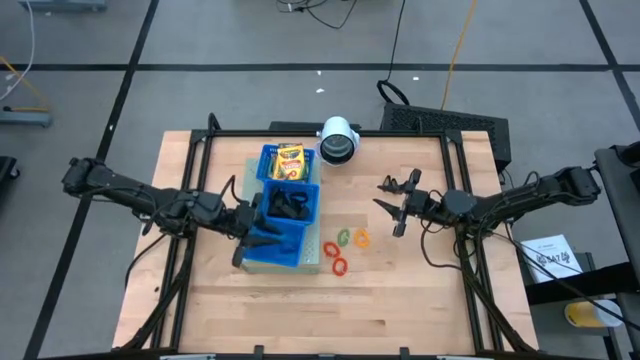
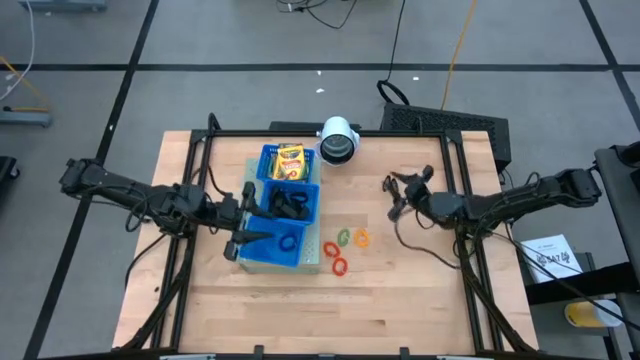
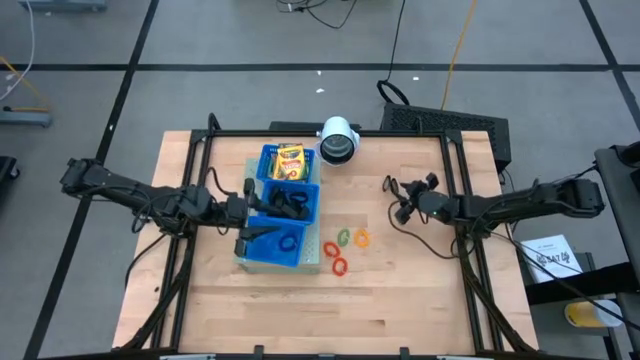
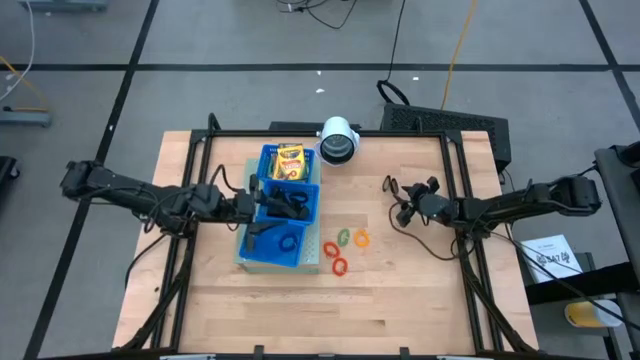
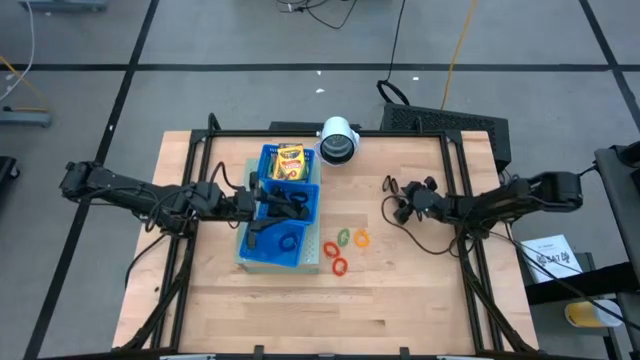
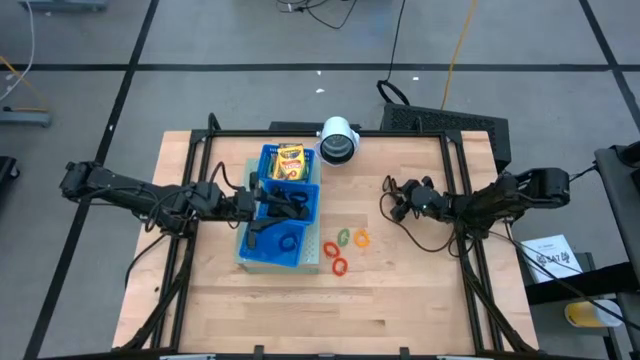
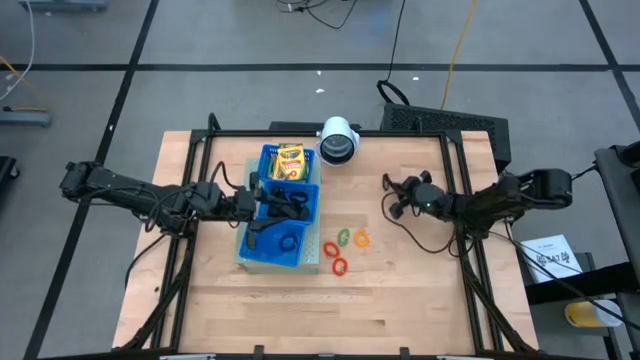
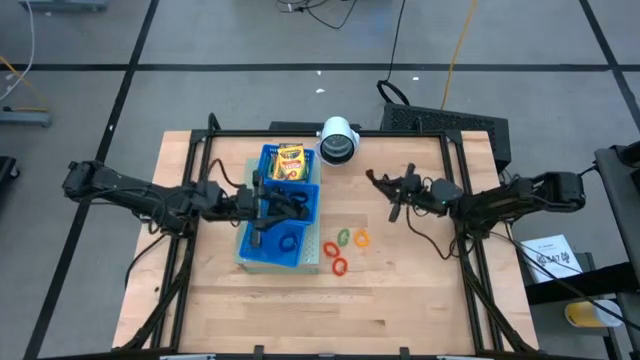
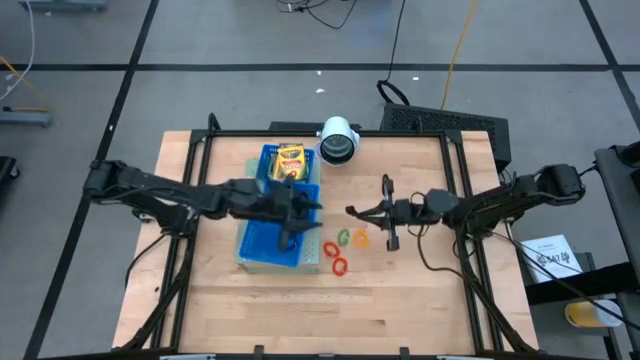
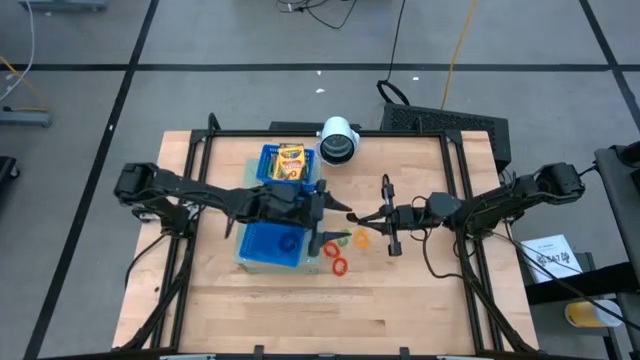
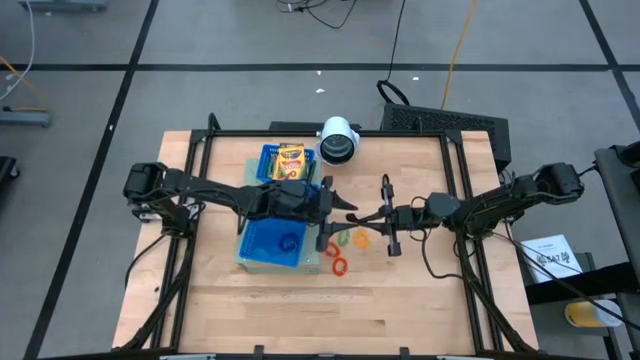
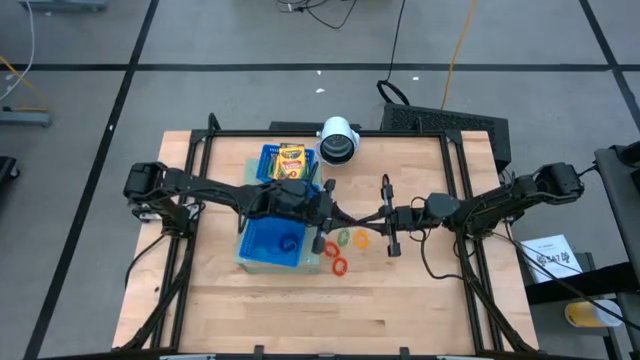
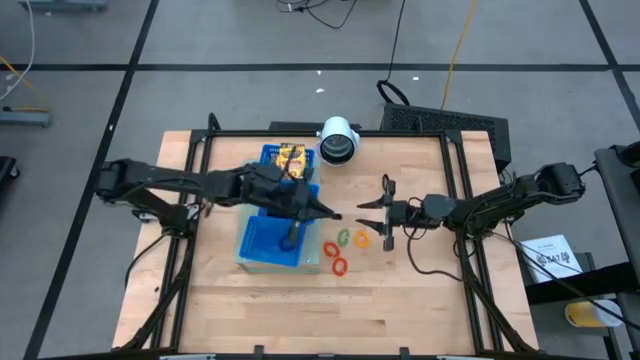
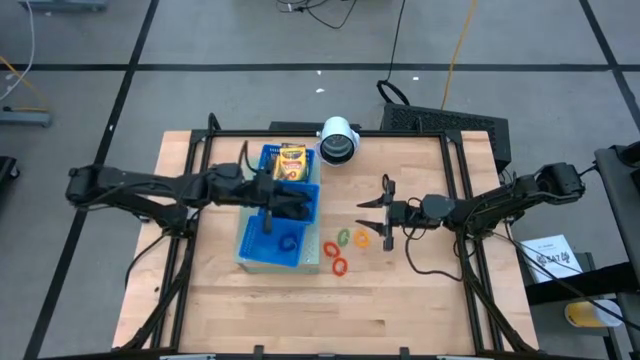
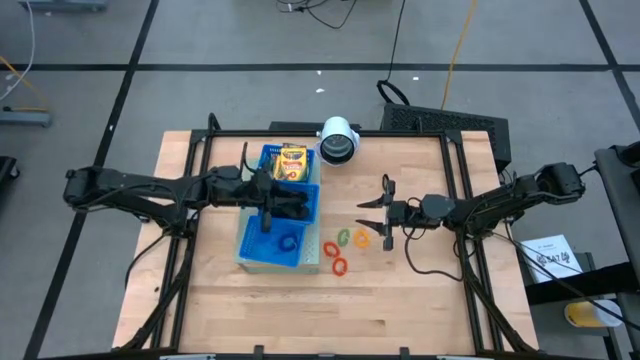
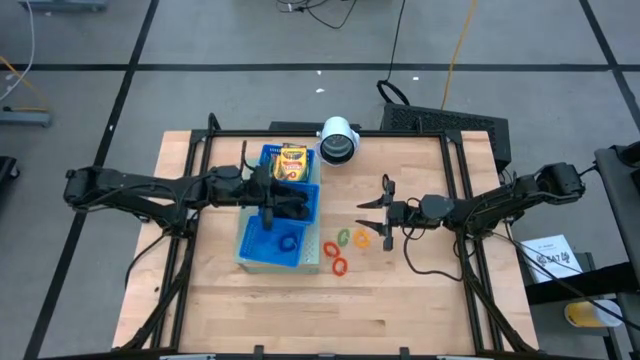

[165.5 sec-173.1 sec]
Task: Pick & Place Office Desk Supplies
Put the black rubber band into the middle blue bin on the shelf

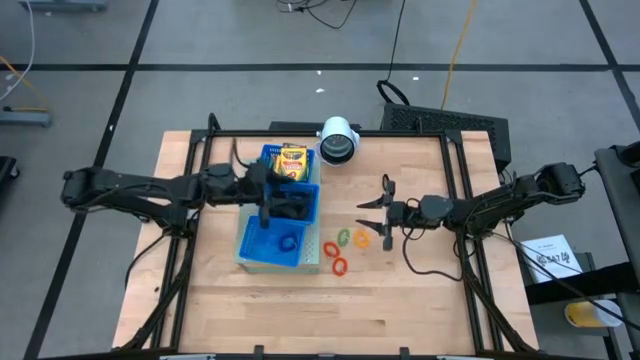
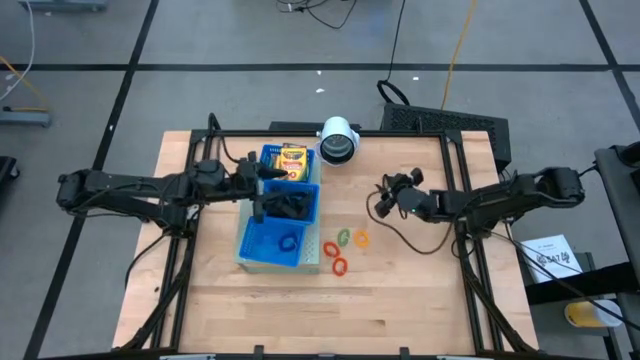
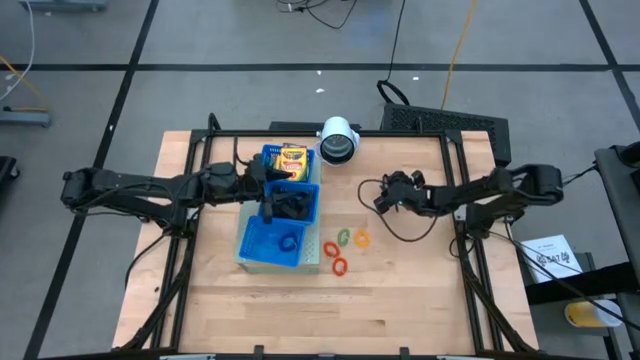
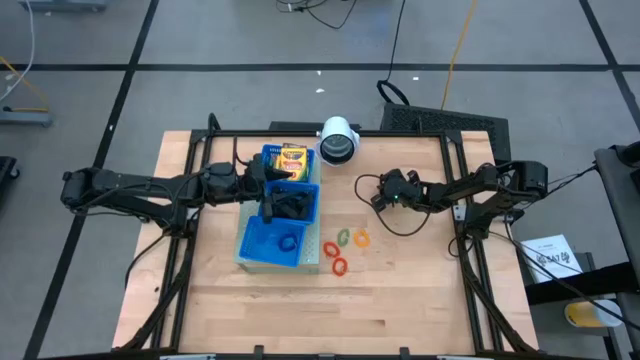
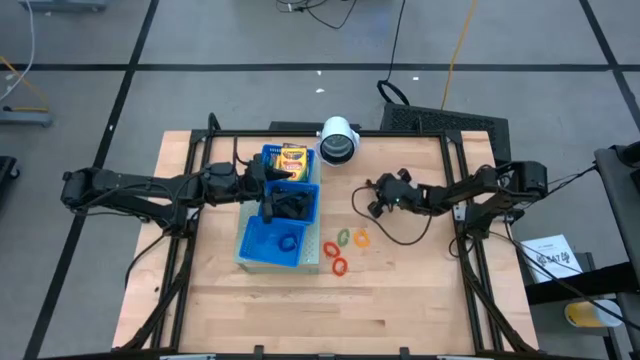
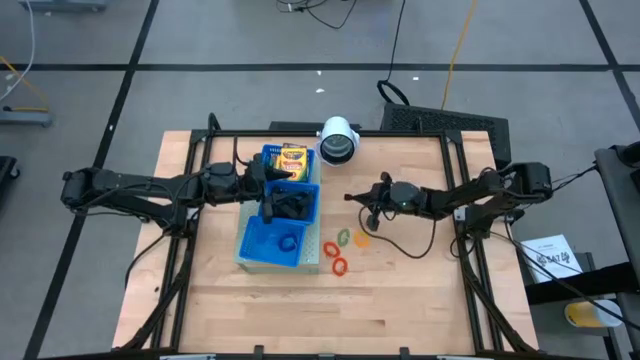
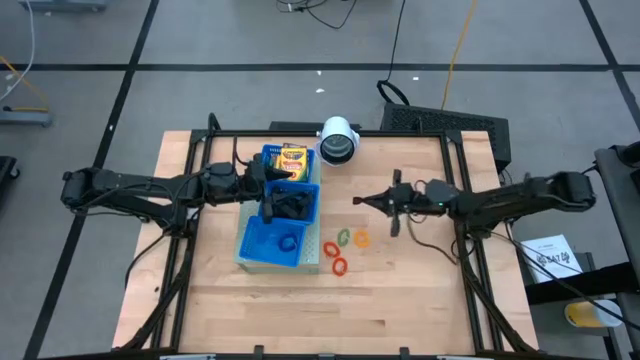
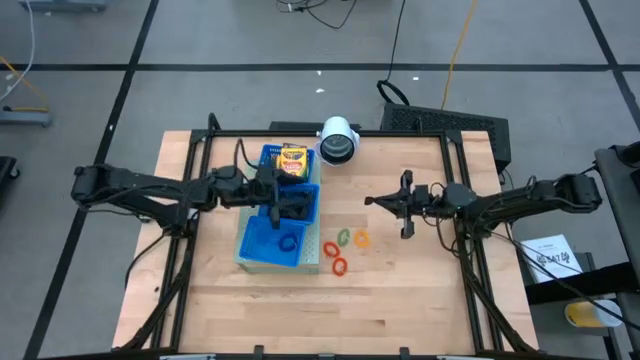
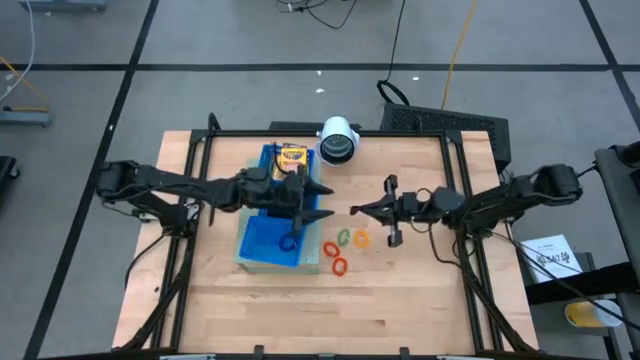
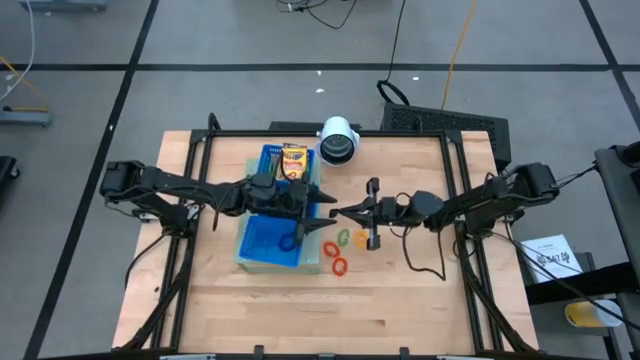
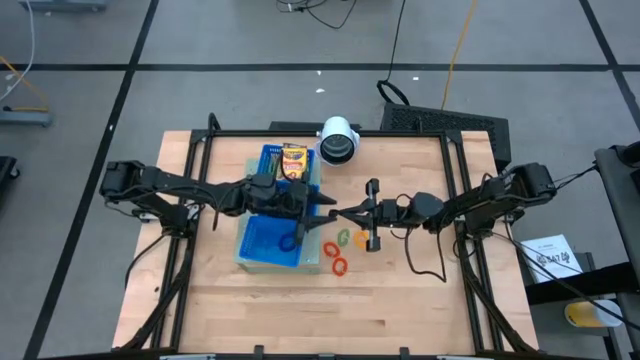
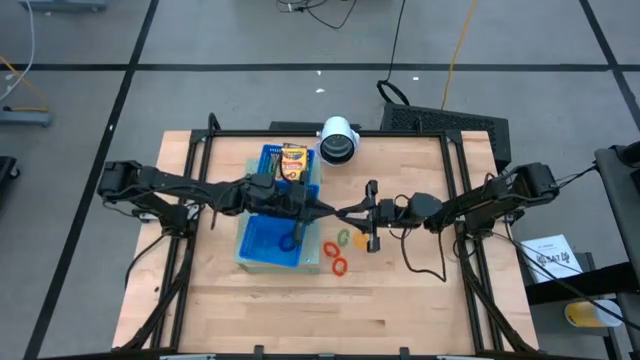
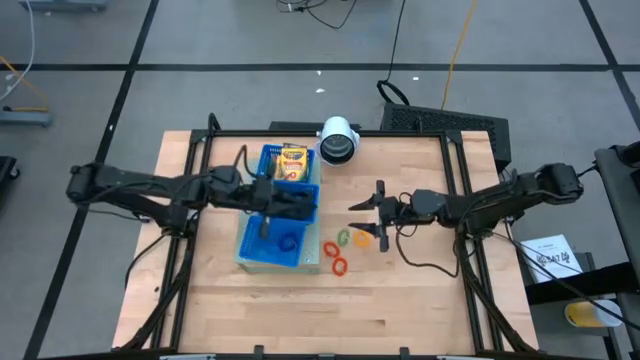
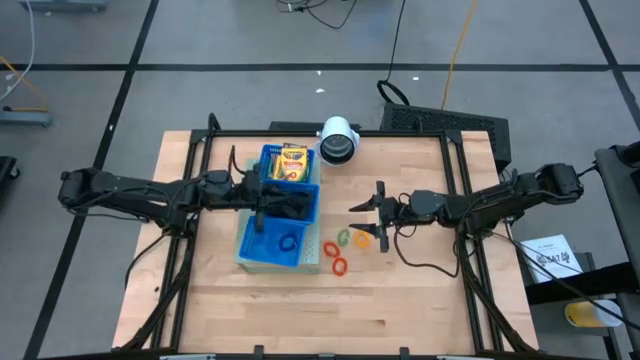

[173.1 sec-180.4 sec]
Put the black rubber band into the middle blue bin on the shelf

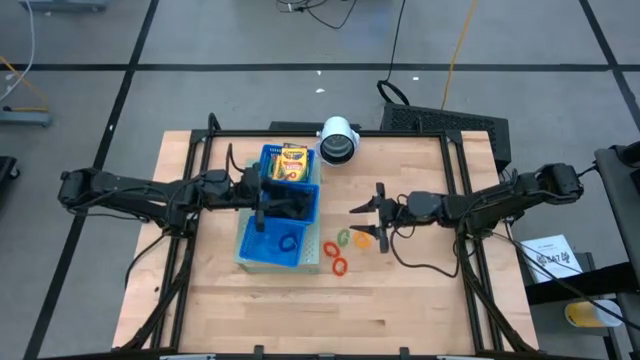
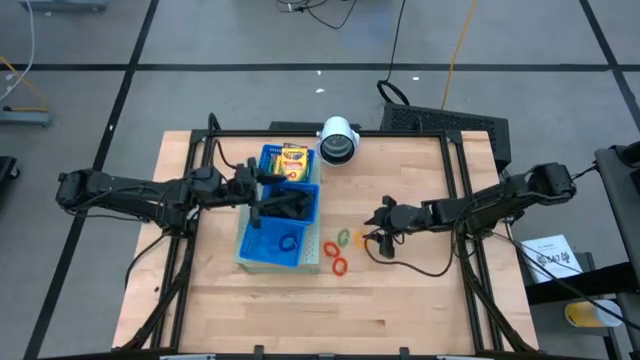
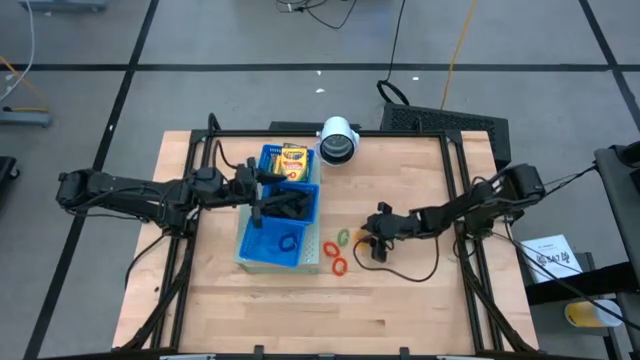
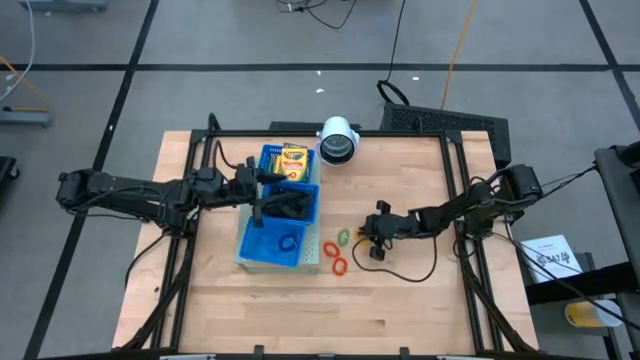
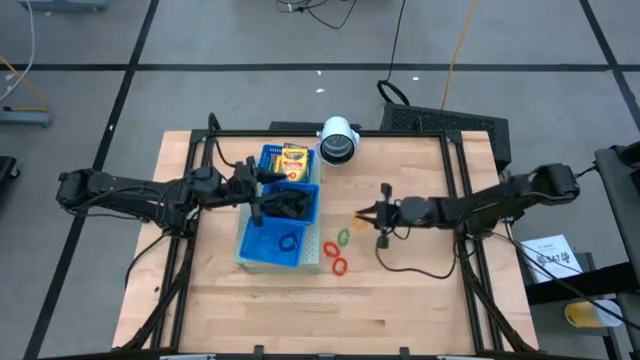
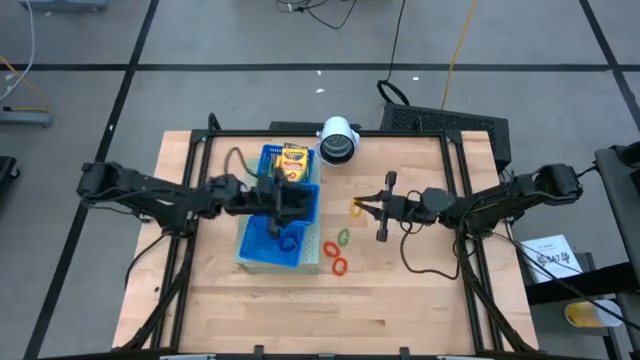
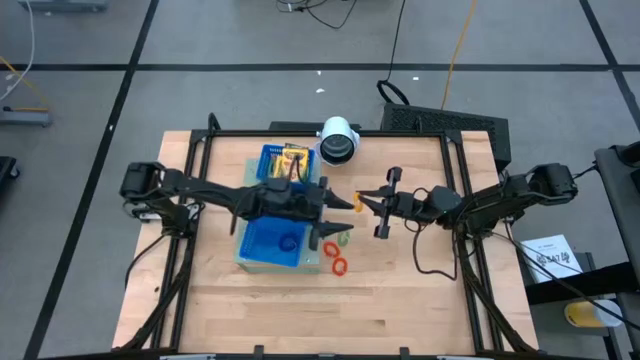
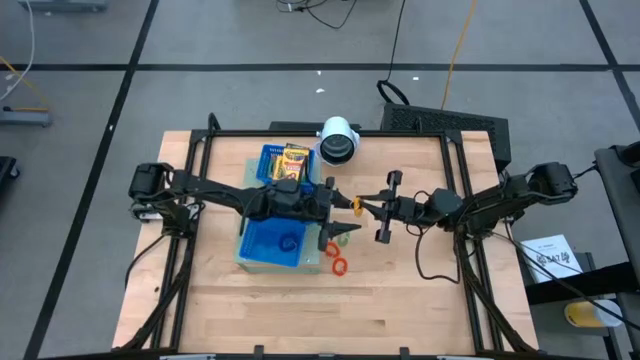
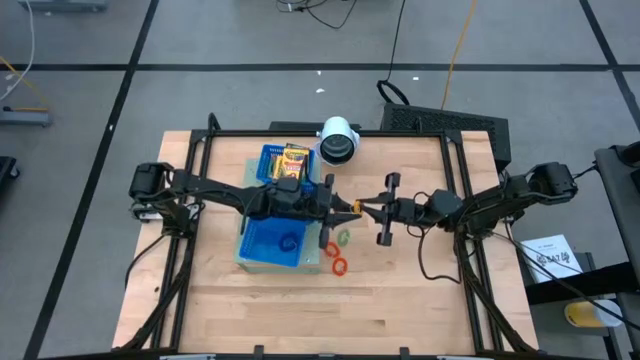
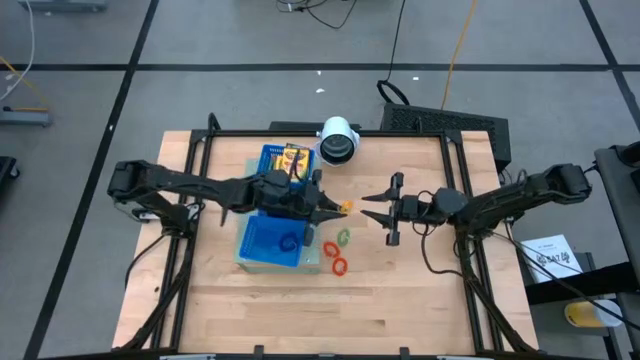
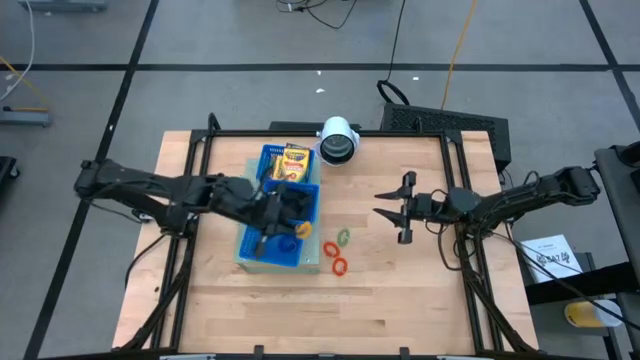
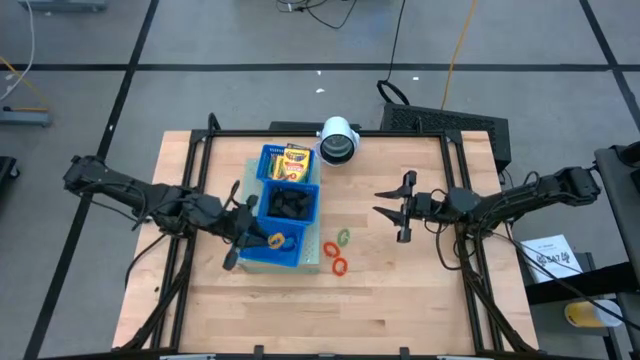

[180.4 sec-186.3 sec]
Put the yellow spring rubber band into the bottom blue bin on the shelf
